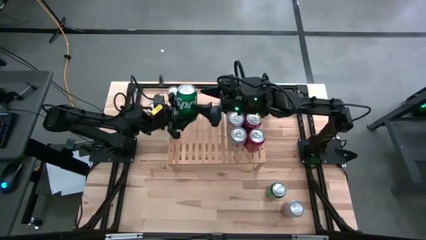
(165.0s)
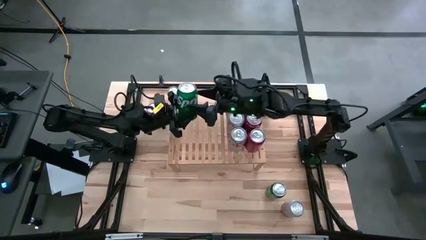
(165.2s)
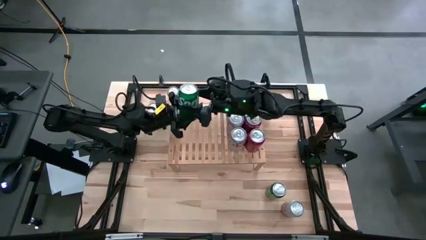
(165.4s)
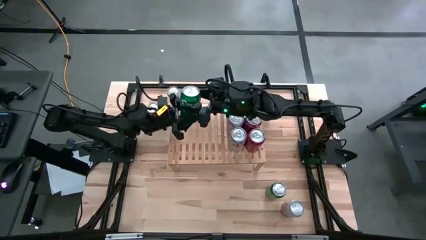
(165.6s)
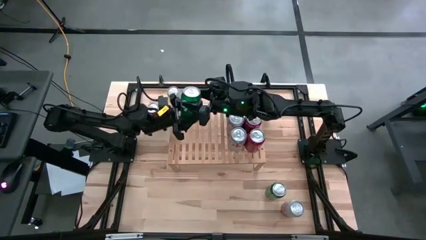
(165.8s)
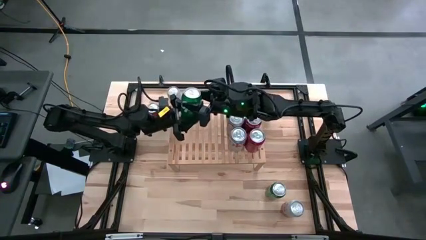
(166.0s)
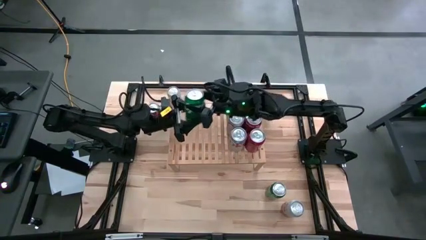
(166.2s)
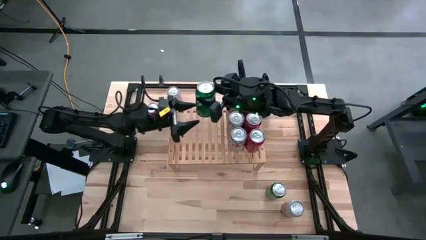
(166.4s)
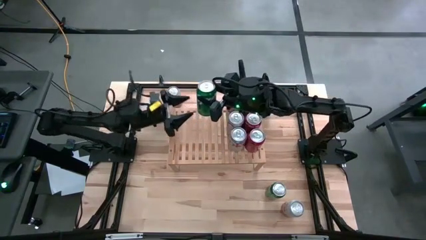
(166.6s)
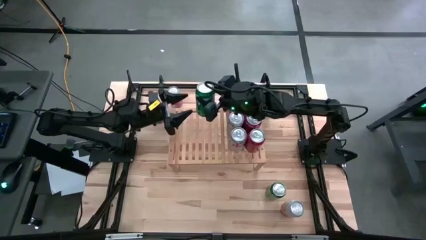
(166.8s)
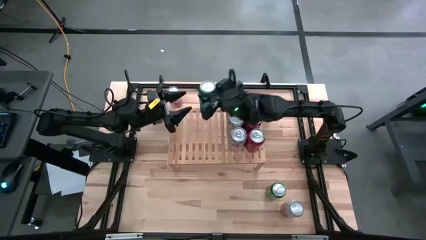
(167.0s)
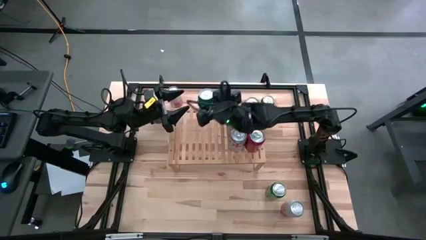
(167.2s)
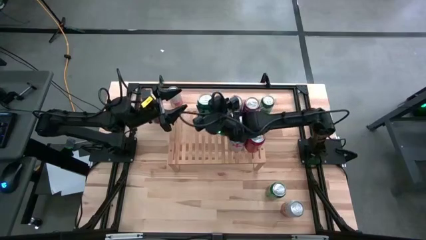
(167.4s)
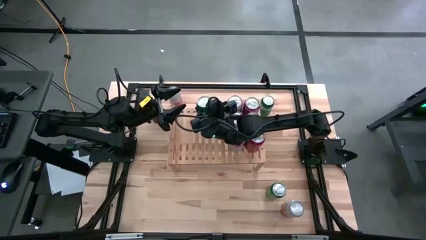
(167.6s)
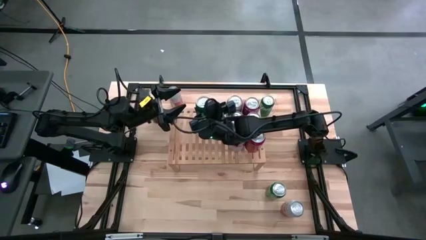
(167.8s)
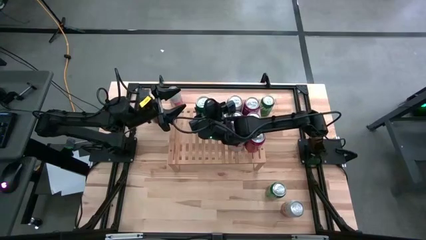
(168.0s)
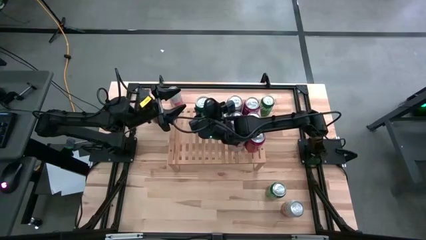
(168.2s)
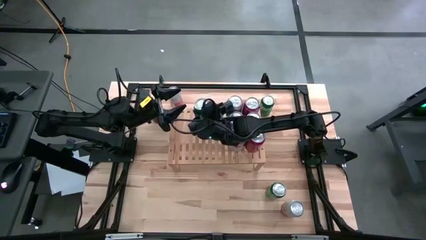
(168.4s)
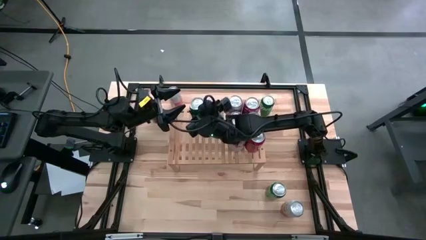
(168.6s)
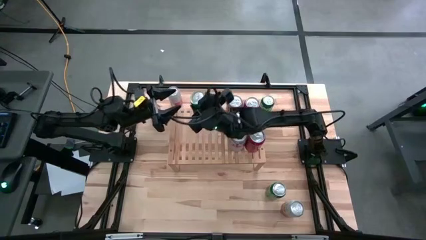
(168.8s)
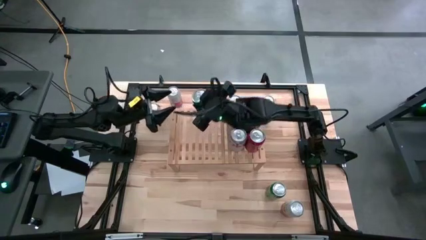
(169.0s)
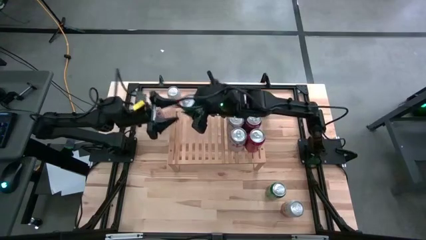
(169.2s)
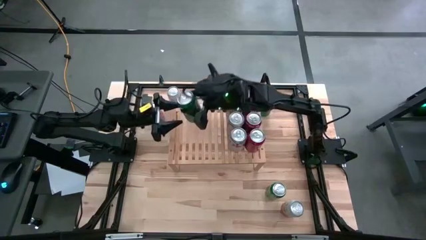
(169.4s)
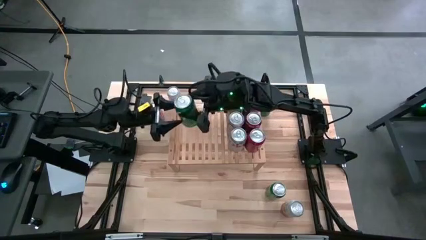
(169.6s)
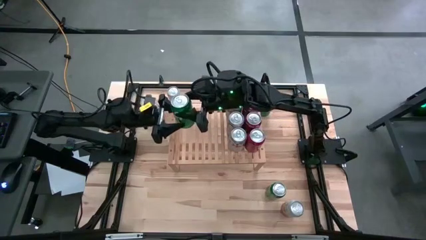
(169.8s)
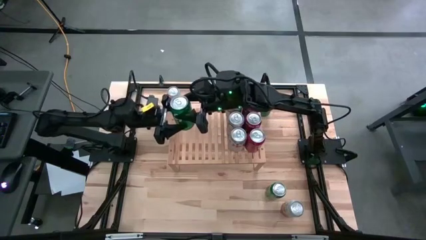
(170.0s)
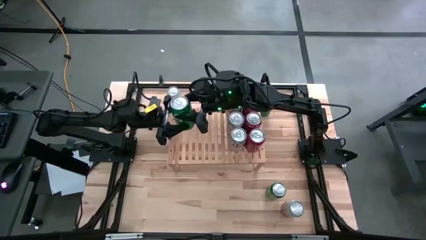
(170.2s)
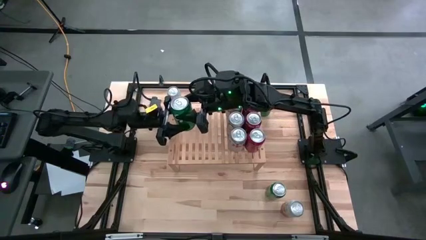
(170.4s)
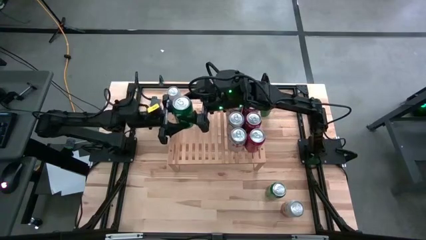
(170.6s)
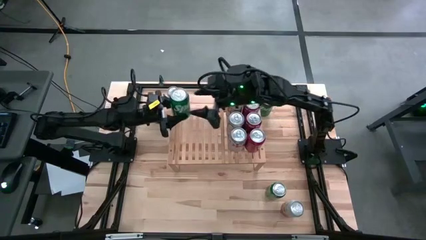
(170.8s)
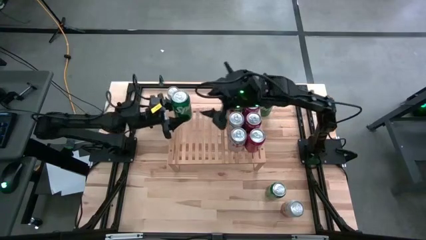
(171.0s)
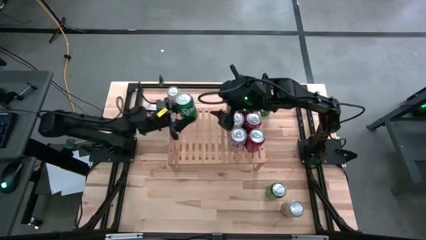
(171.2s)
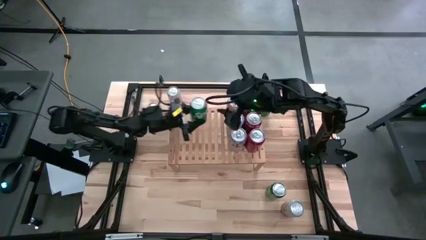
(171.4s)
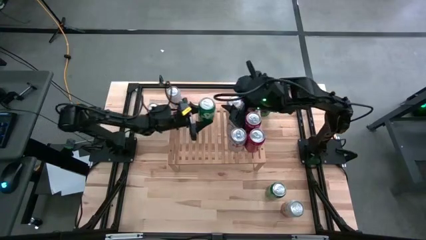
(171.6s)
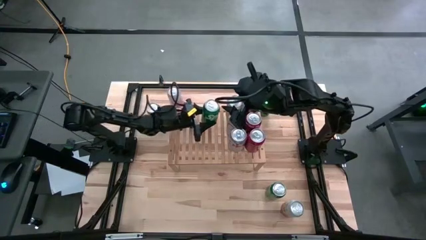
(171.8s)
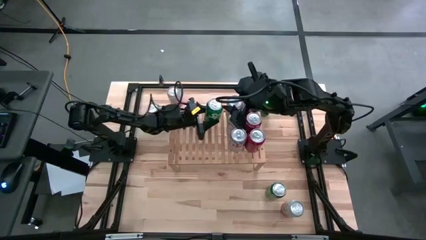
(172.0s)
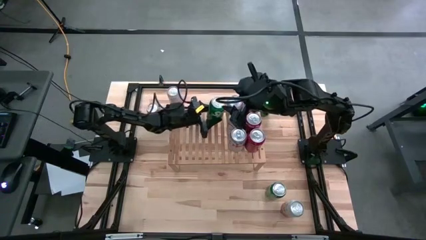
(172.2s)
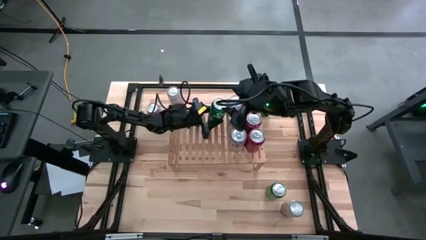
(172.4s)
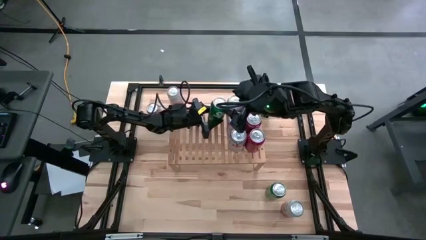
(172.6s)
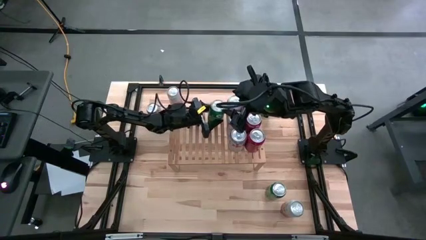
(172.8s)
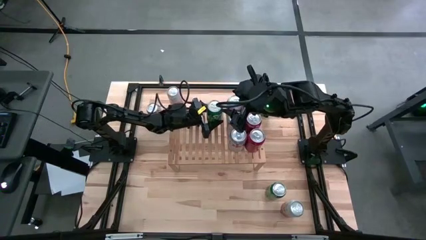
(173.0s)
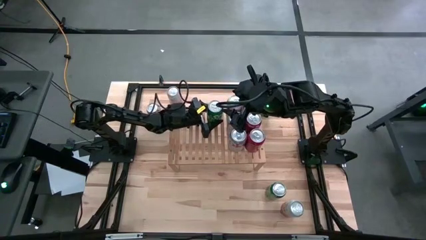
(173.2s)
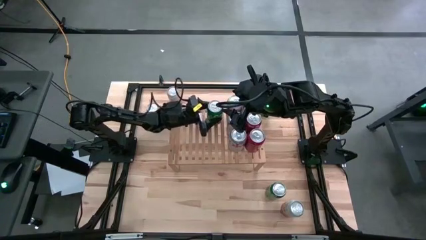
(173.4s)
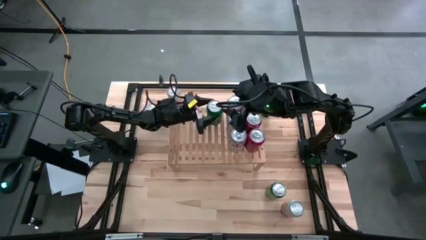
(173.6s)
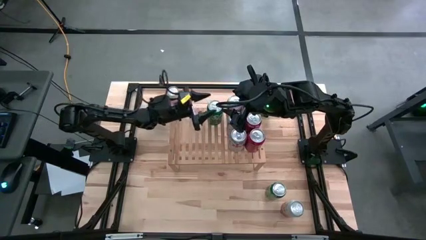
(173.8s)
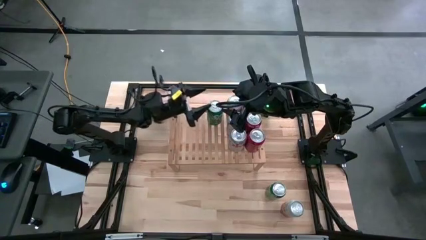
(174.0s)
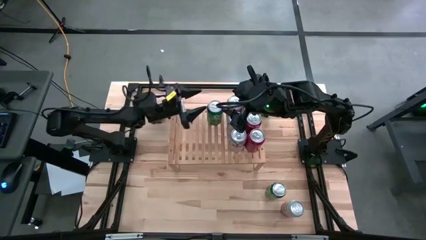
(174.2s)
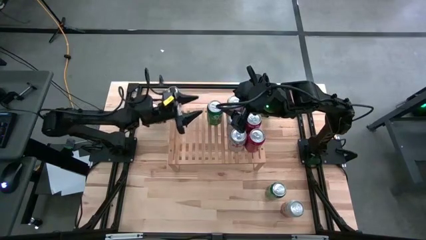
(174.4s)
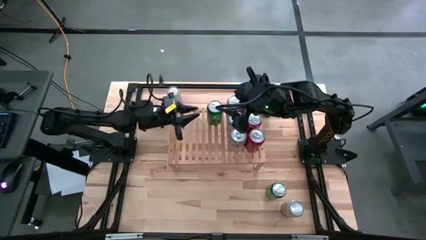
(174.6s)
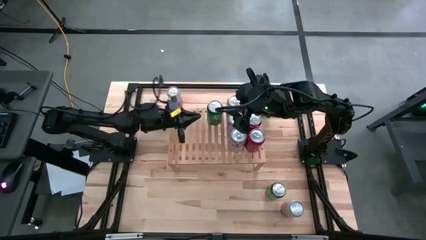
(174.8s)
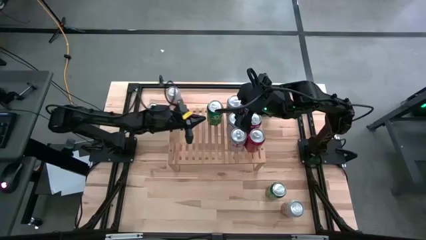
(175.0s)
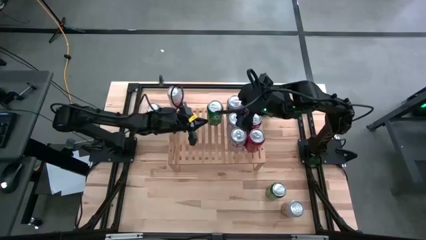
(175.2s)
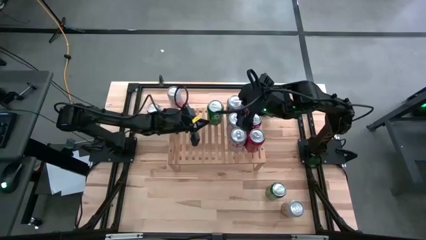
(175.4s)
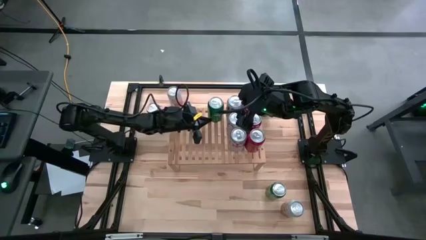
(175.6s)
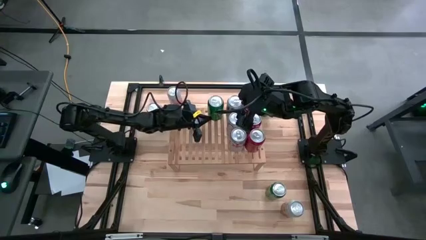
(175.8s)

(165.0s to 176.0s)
Task: Place canned beverage on shelf
Put the top right green soda can on the shelf

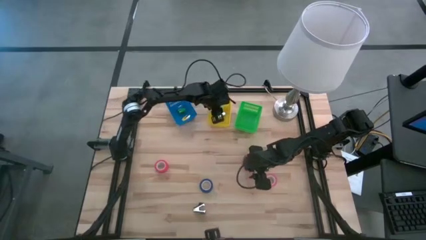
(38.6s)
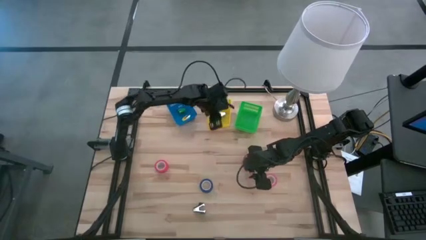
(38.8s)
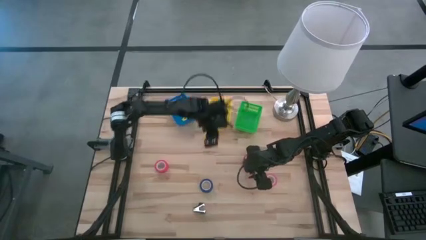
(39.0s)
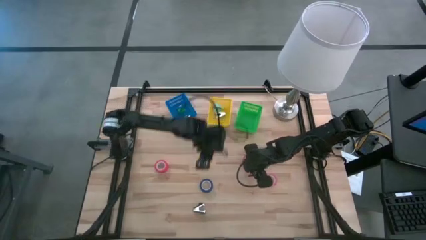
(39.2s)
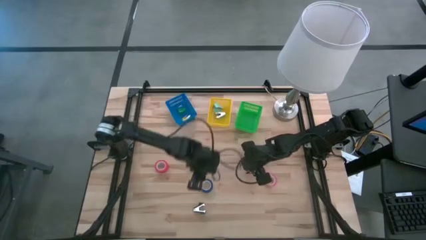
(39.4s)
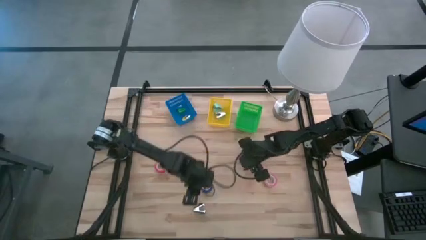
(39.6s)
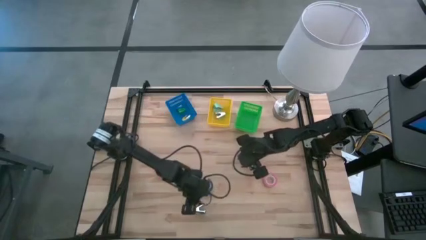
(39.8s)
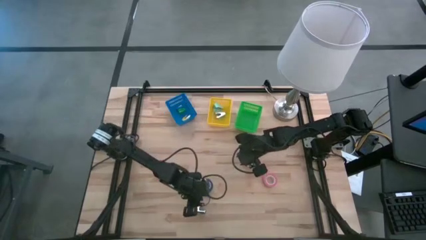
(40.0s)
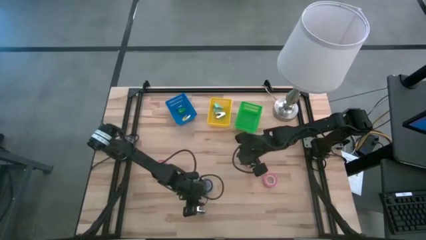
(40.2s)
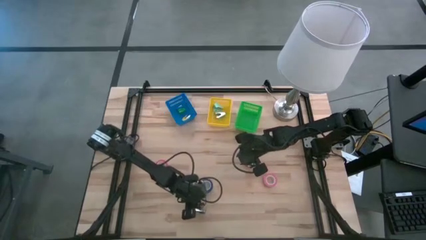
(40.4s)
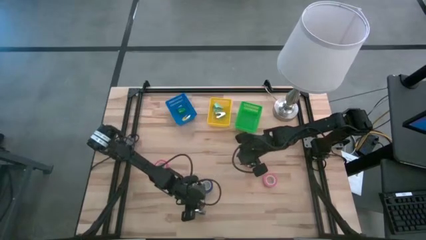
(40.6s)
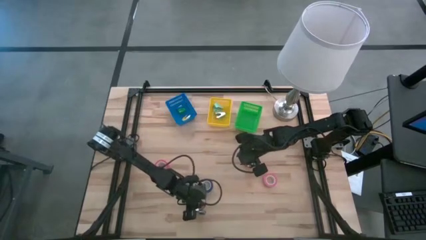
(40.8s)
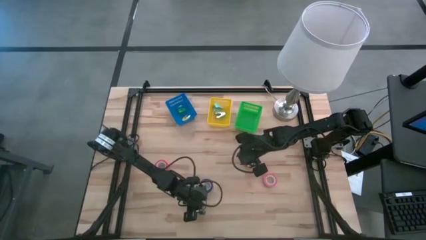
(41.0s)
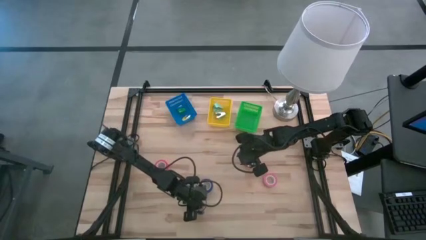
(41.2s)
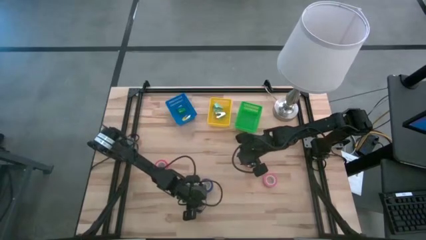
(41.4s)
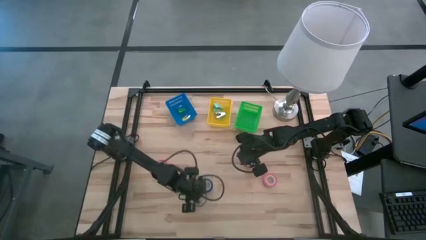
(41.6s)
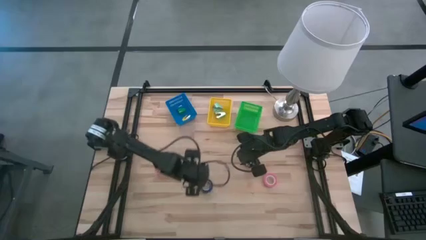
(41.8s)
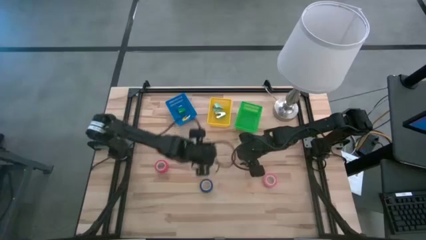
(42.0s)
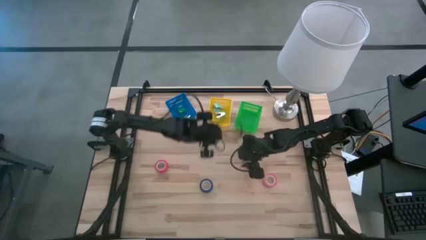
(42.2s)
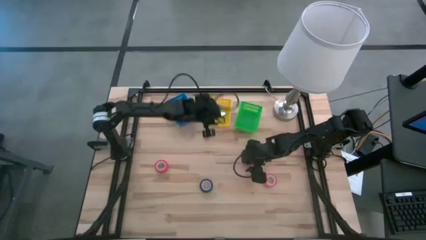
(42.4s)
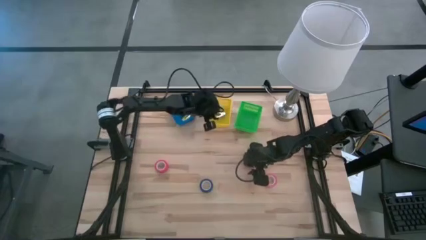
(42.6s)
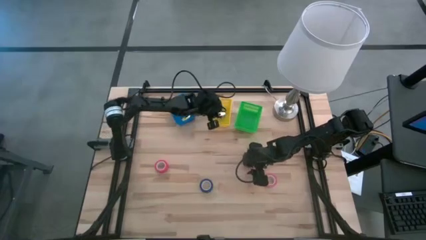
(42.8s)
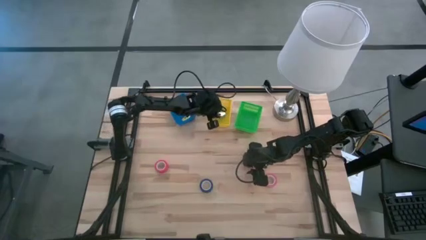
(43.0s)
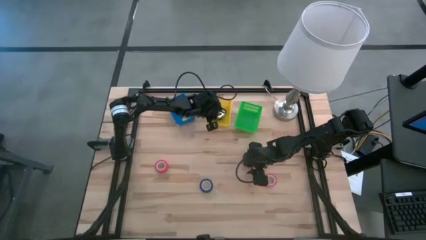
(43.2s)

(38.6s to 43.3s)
Task: Pick and place Stapler, Stapler remover, tape
Put the black staple remover into the yellow bin

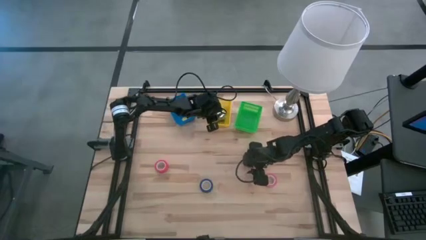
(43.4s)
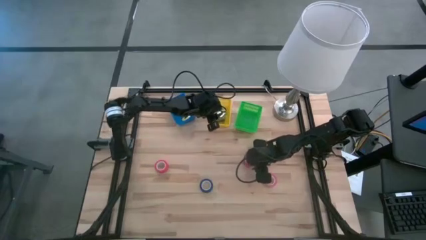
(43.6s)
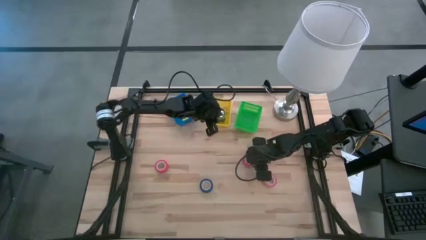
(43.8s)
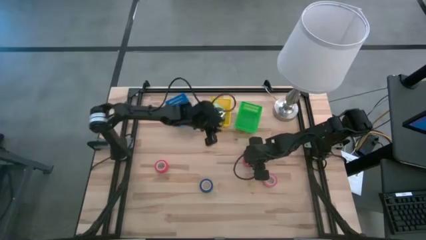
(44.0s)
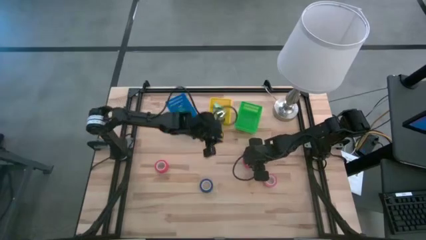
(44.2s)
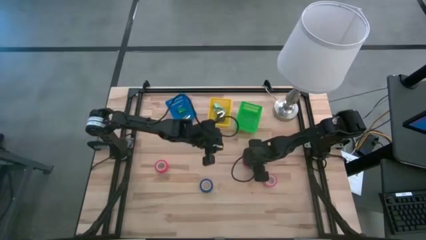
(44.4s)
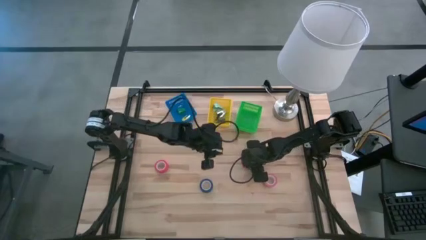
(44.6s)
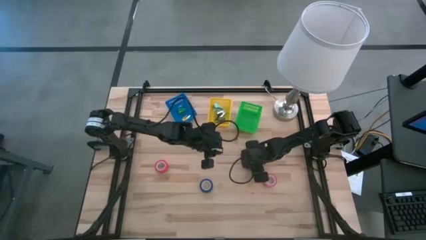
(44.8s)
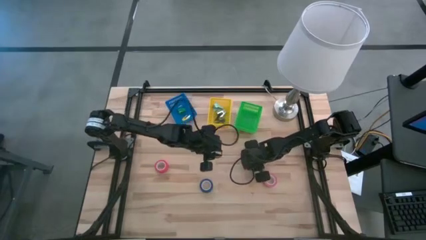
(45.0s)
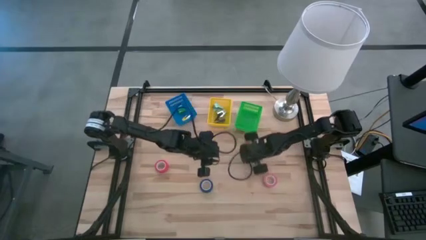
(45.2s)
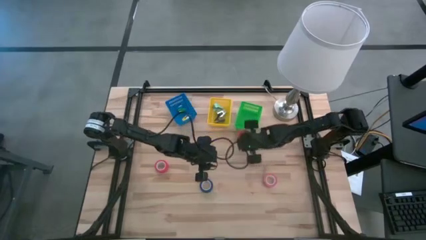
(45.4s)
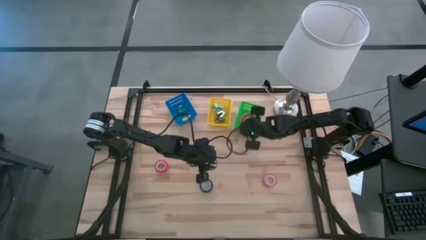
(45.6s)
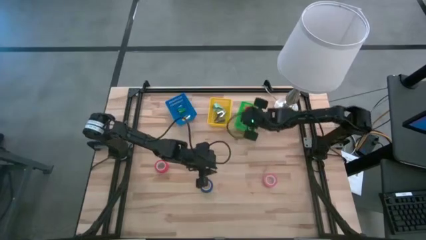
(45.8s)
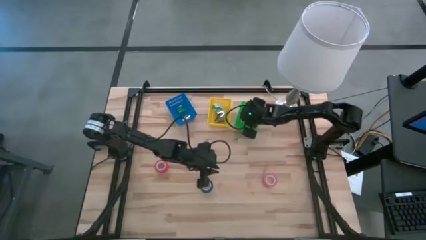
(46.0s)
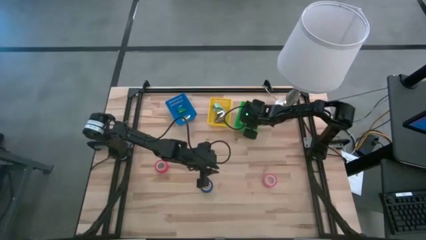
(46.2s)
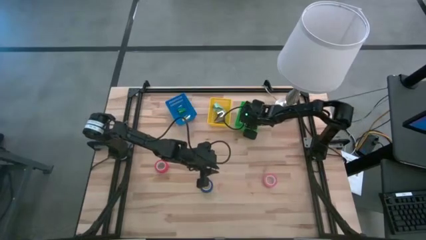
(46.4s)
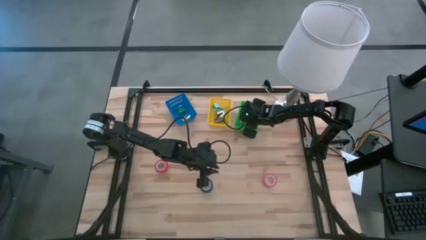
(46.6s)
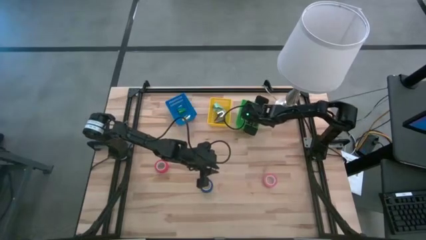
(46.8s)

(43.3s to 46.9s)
Put the red tape into the green bin
